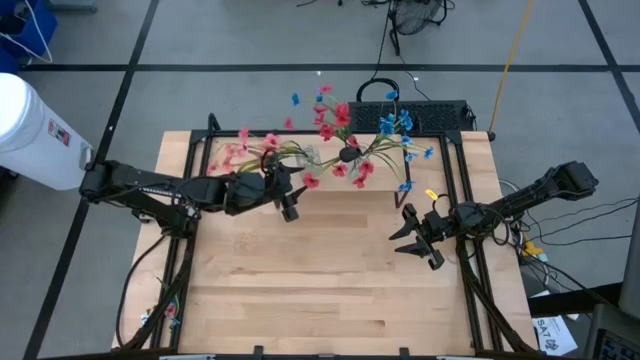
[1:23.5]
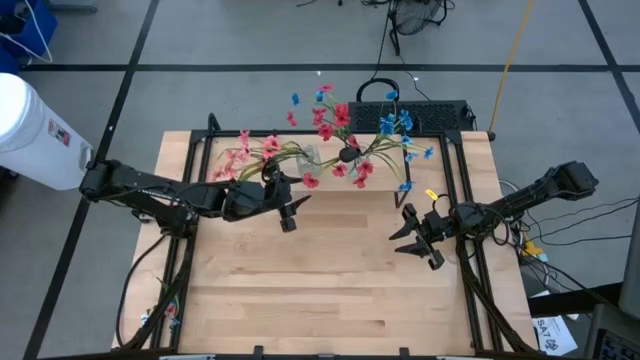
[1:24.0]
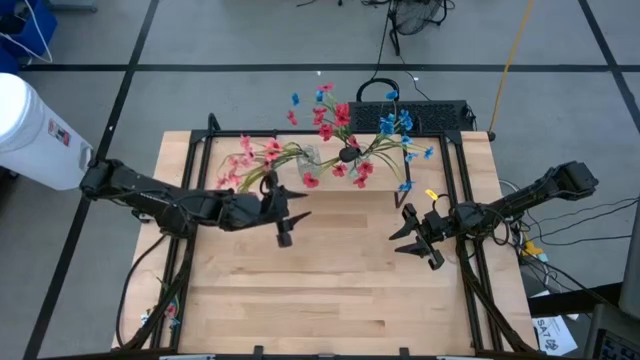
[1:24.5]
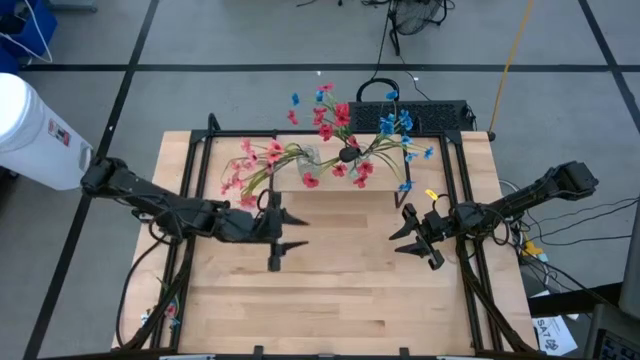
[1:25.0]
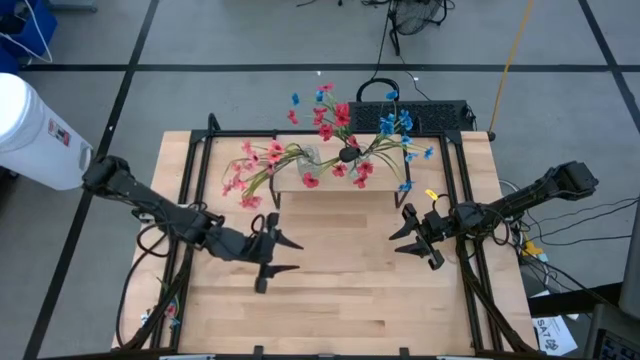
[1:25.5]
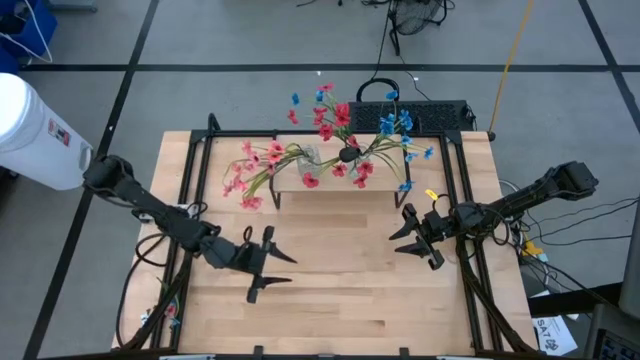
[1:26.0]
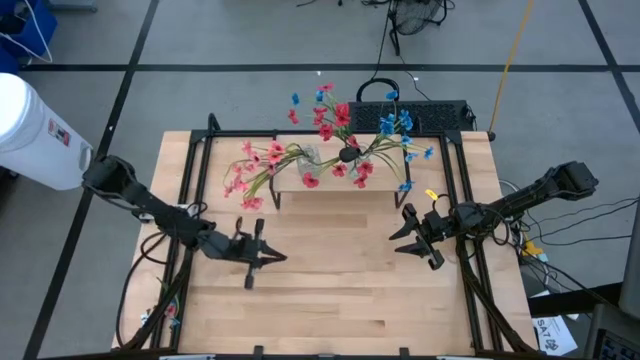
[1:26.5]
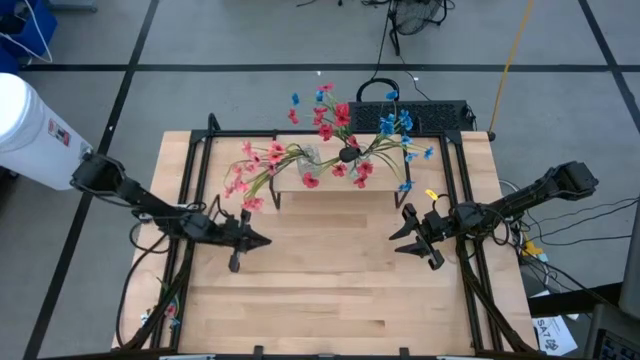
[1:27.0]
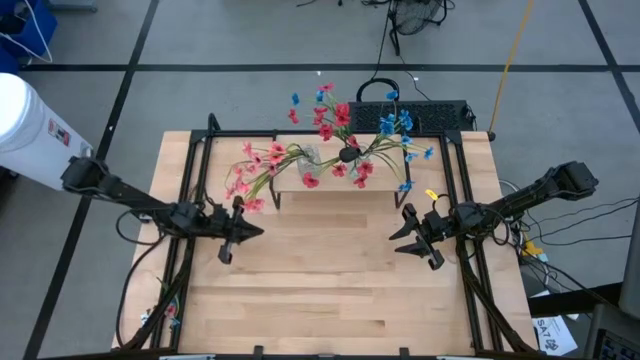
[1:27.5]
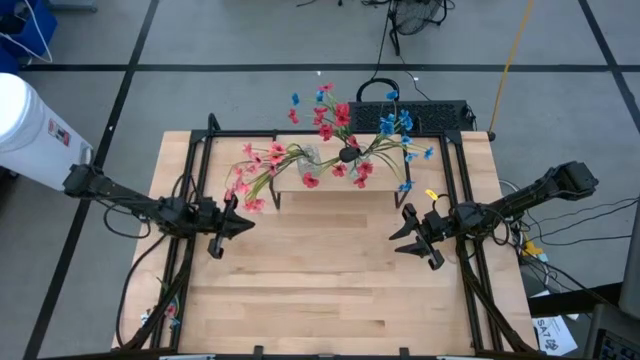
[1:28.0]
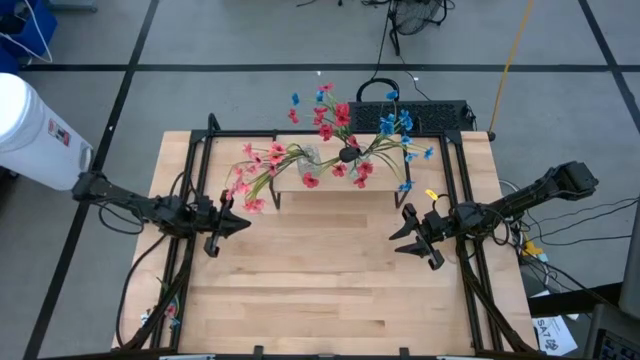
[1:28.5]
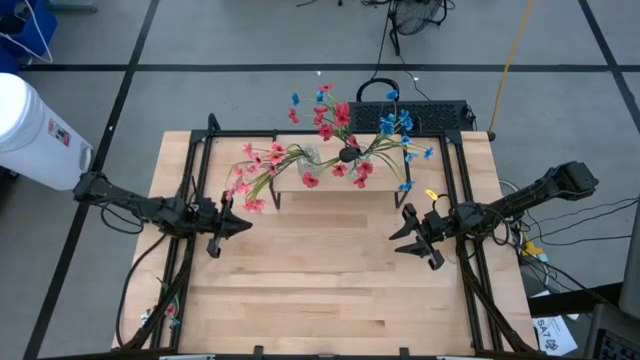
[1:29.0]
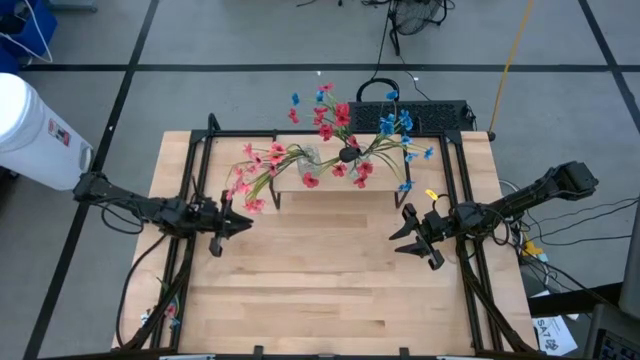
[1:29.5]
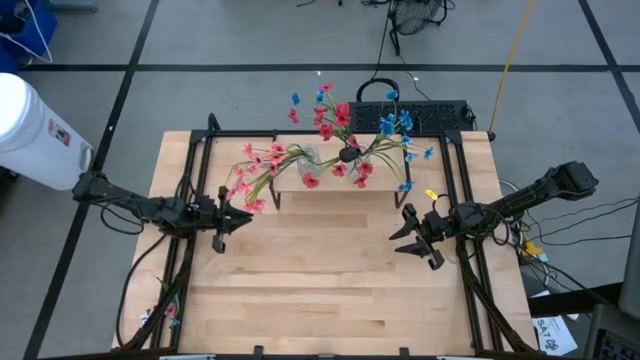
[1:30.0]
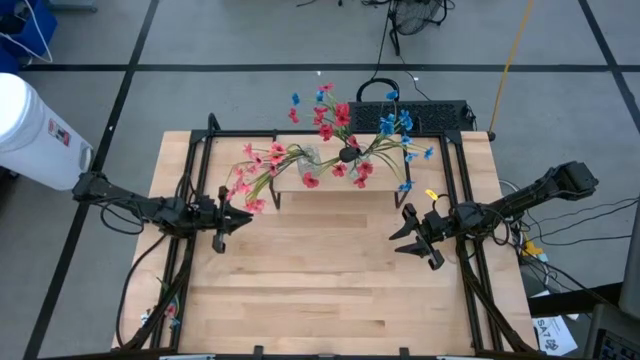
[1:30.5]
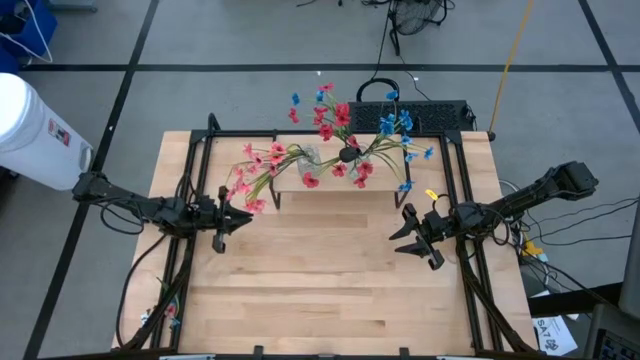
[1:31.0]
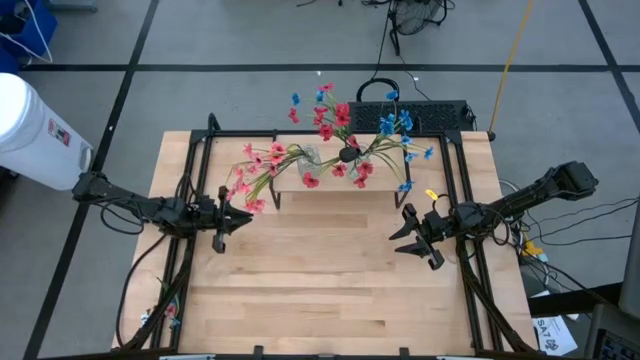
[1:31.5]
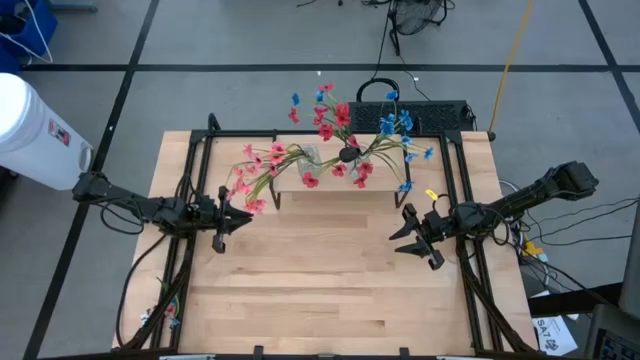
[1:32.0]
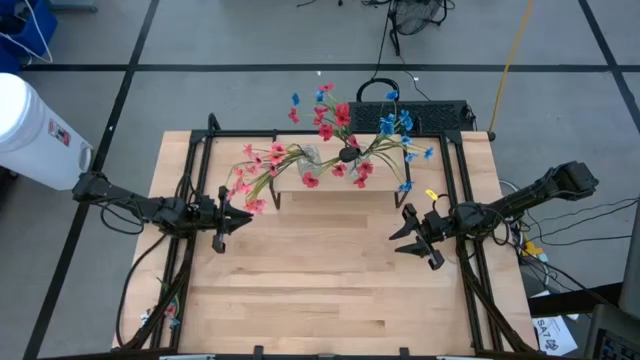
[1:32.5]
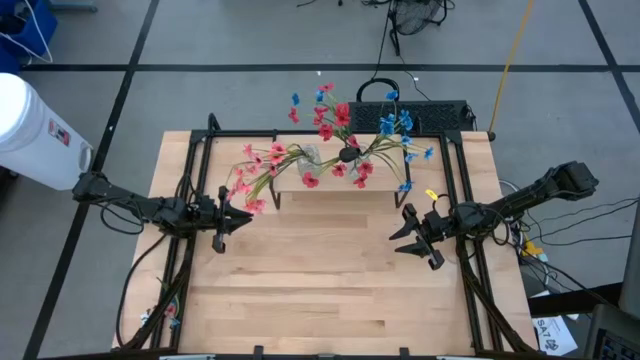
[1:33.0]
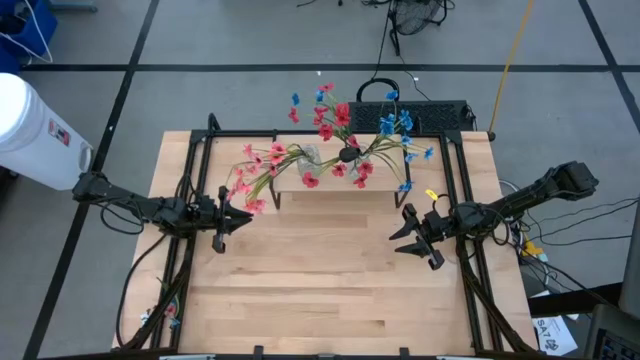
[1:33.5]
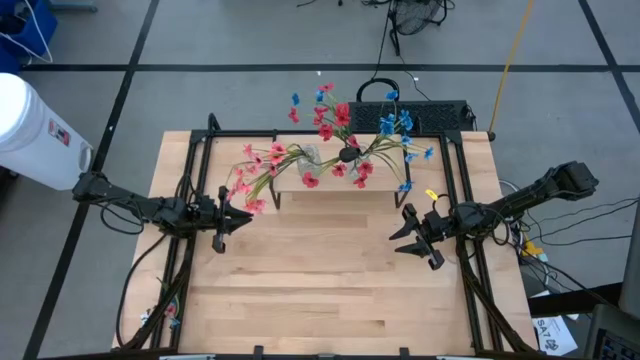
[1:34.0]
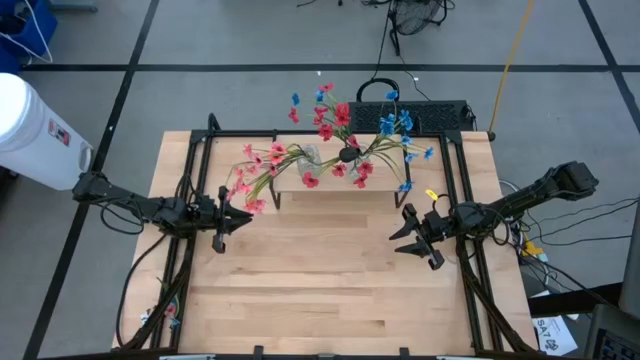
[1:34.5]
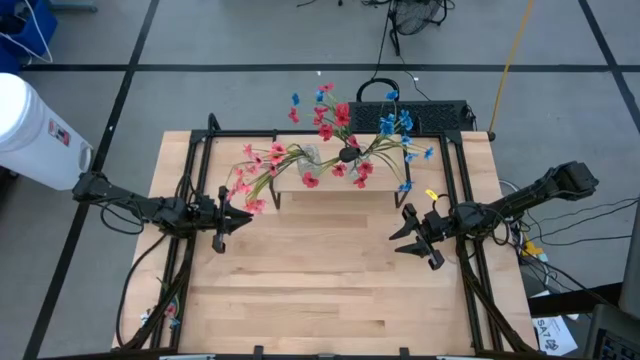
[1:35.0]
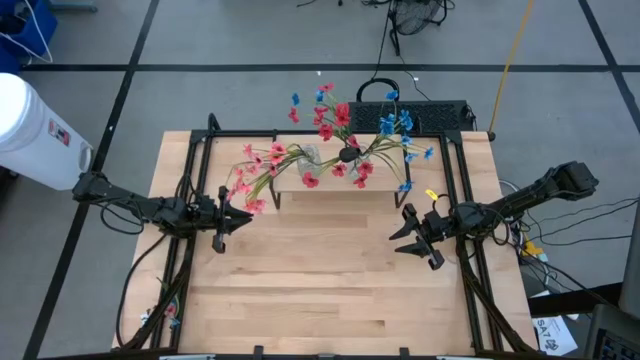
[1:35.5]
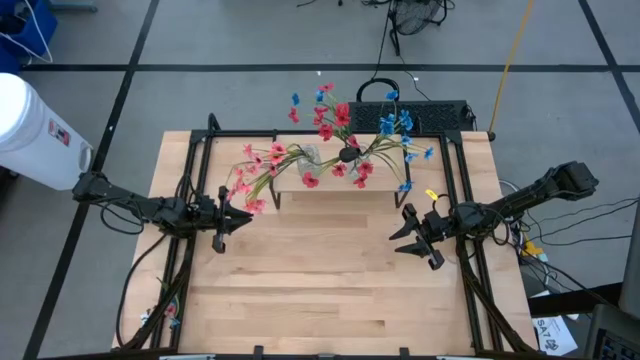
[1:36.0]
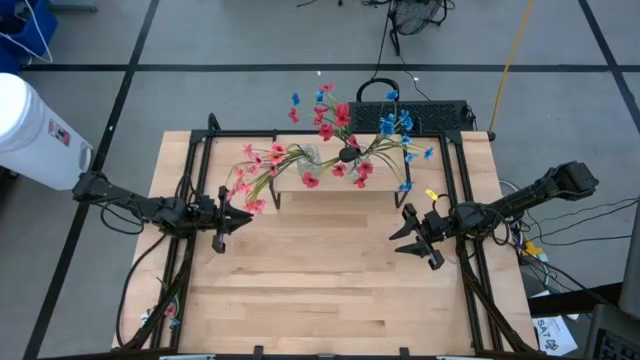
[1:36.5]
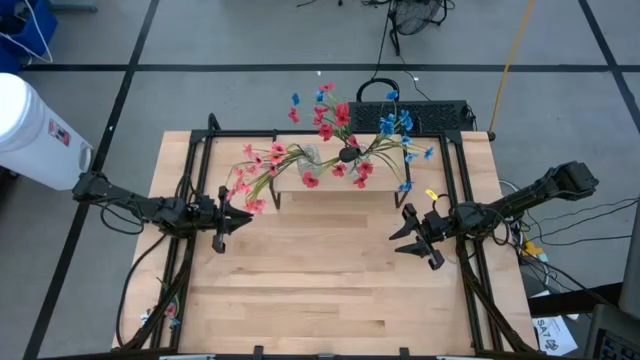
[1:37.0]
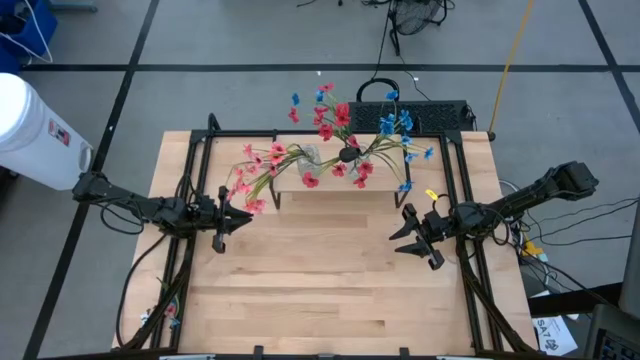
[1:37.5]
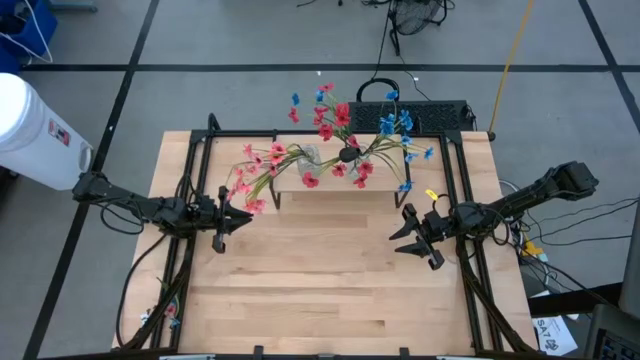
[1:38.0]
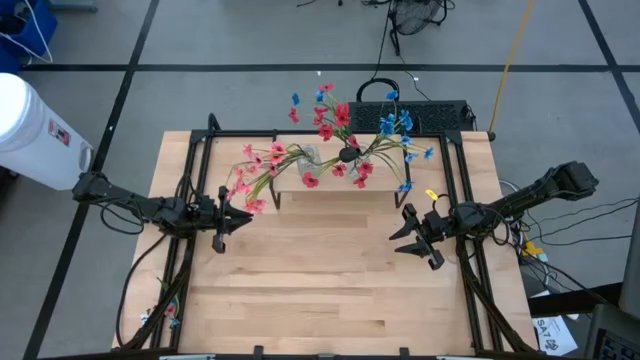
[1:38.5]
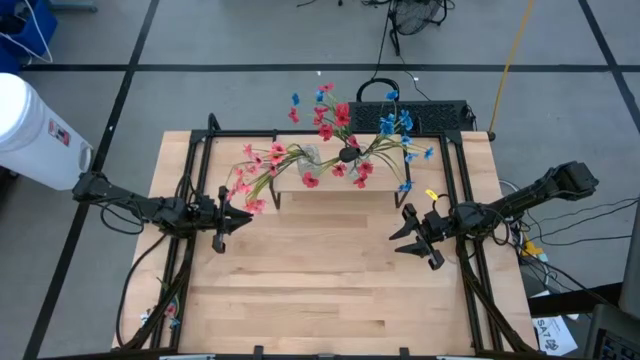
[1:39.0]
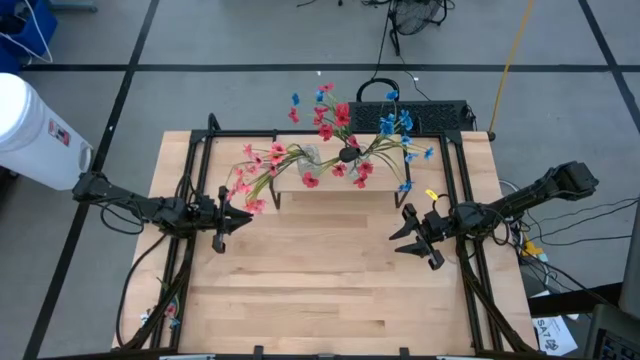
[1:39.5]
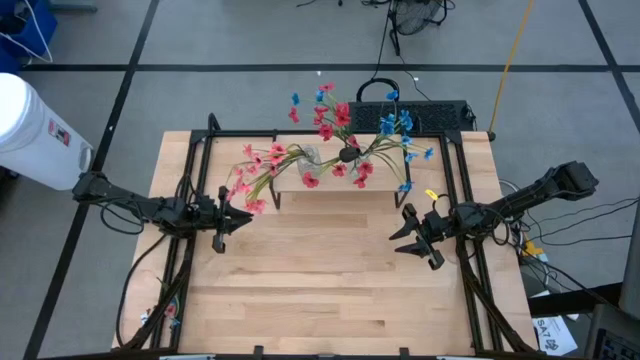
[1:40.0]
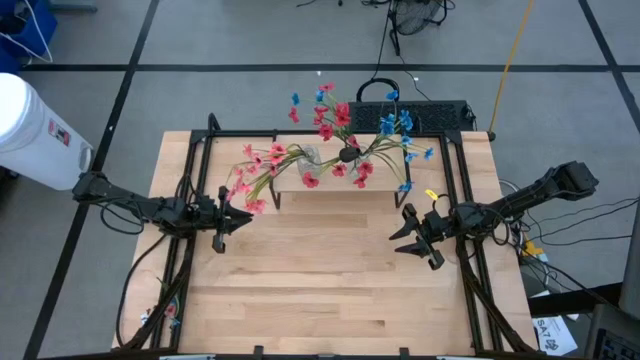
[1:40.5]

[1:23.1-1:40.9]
Task: Pick and place flowers into a vace then onto a shelf
Return to Home Position

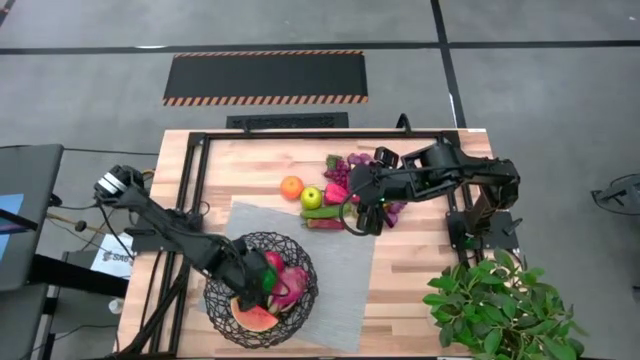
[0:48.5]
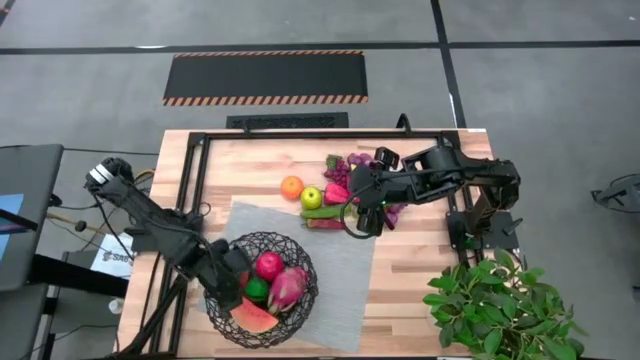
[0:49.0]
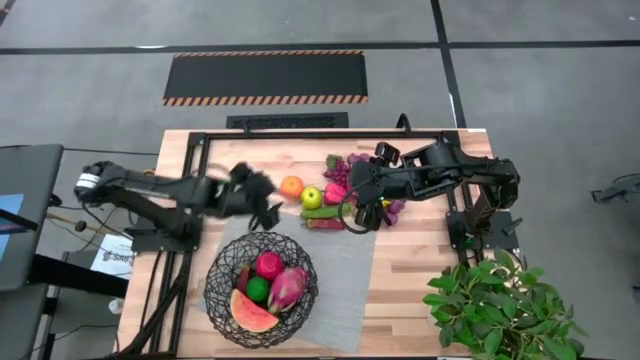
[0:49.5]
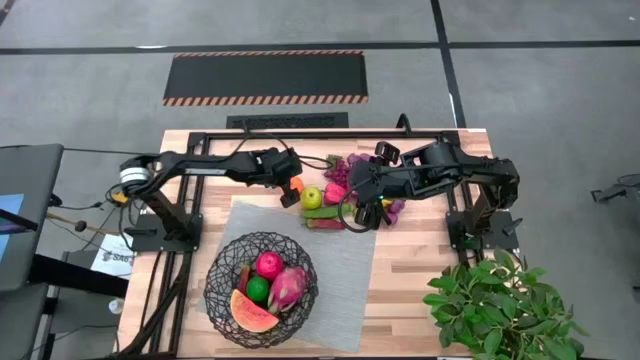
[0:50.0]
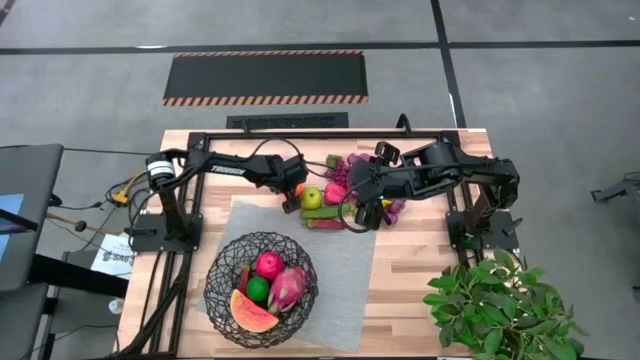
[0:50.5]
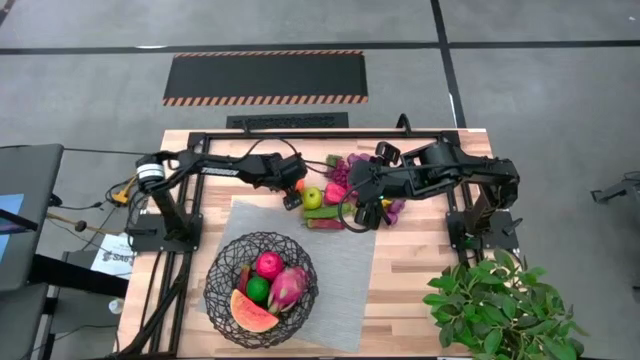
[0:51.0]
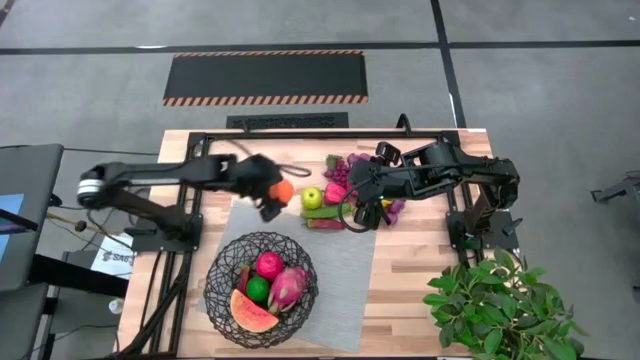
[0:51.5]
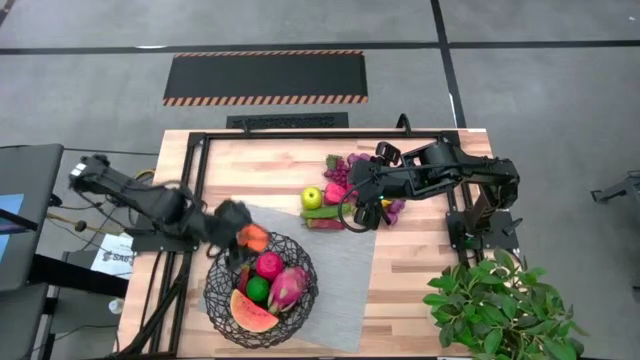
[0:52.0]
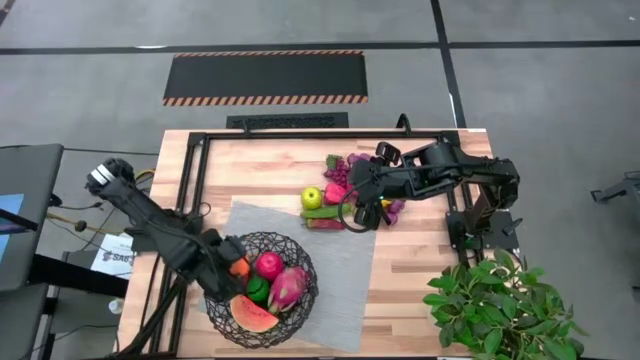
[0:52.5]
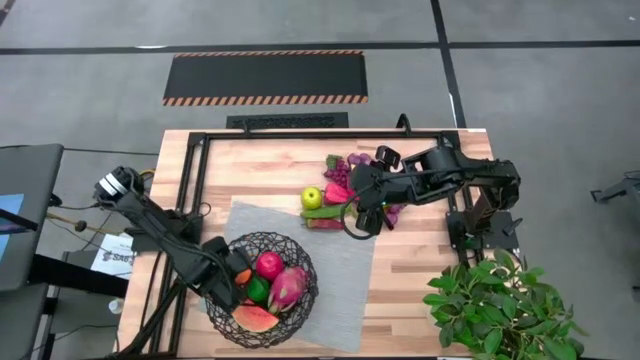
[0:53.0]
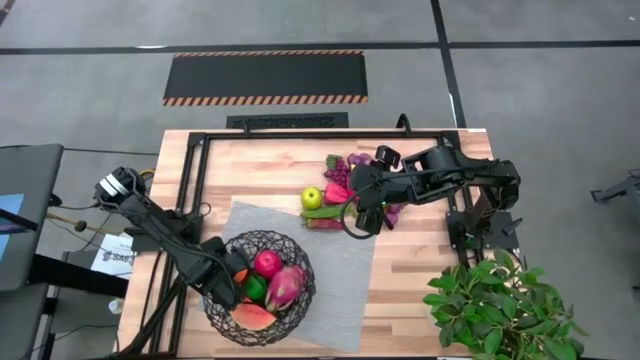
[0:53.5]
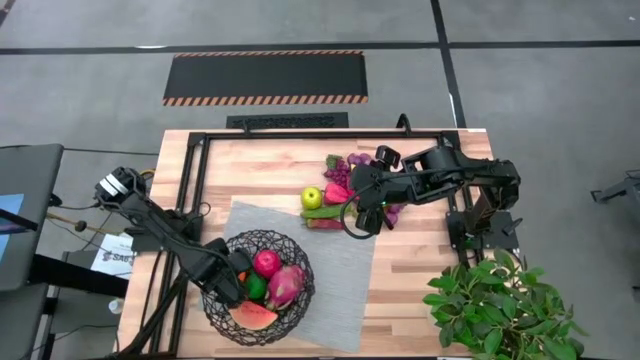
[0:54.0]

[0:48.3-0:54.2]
Task: Build produce basket
Put the orange into the mesh basket
